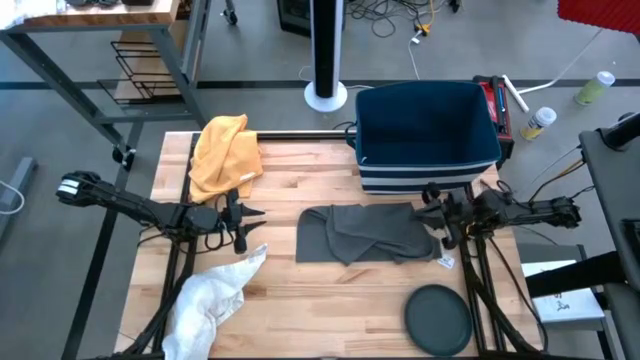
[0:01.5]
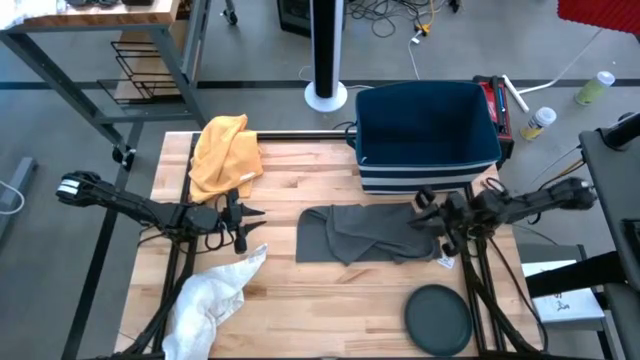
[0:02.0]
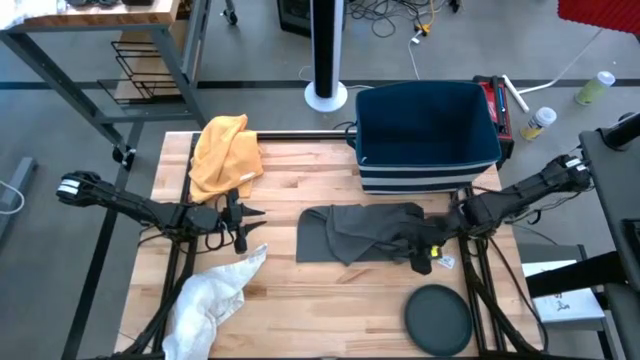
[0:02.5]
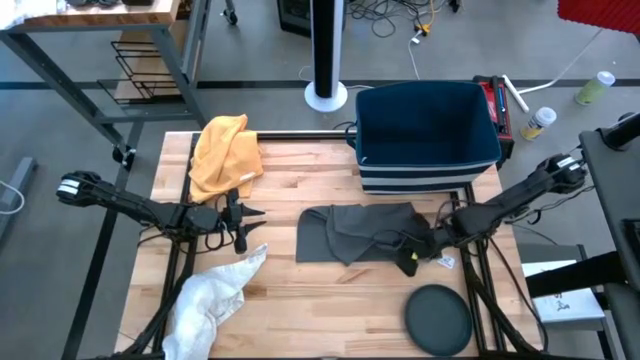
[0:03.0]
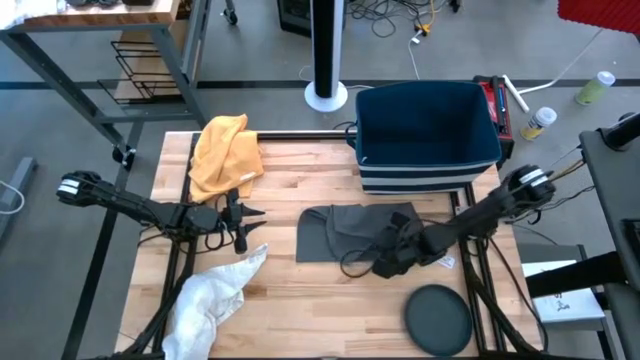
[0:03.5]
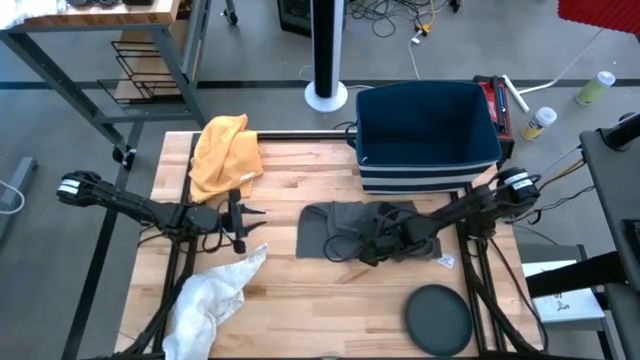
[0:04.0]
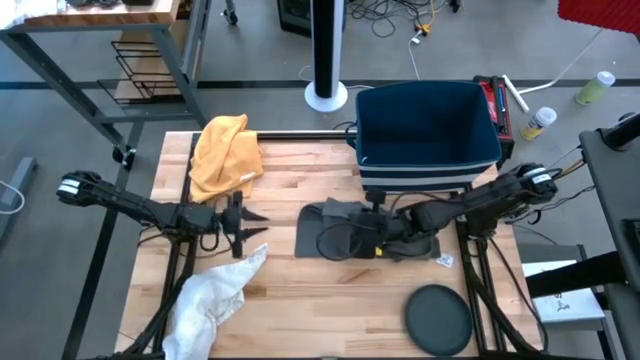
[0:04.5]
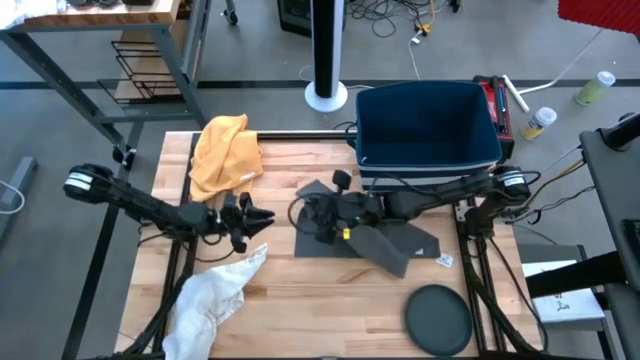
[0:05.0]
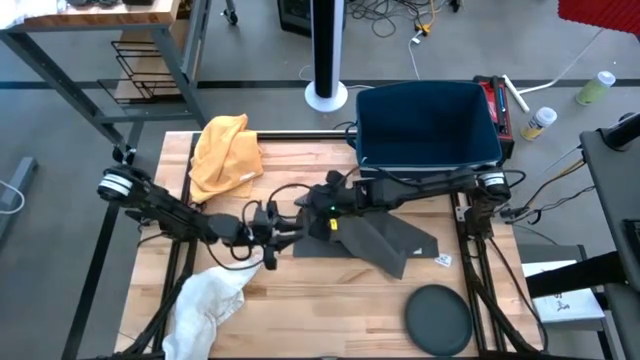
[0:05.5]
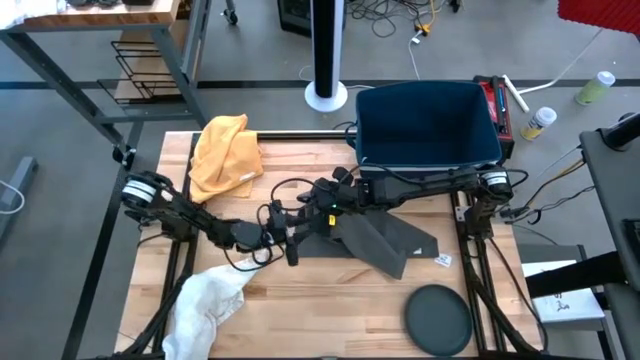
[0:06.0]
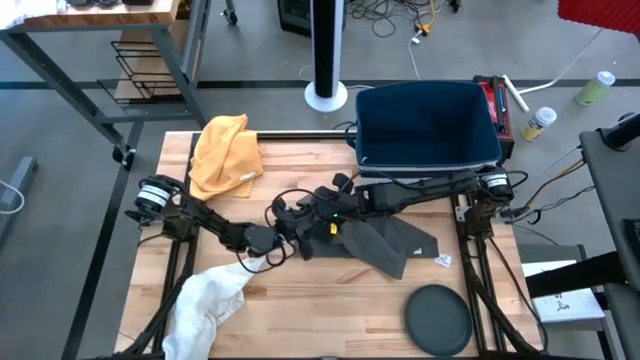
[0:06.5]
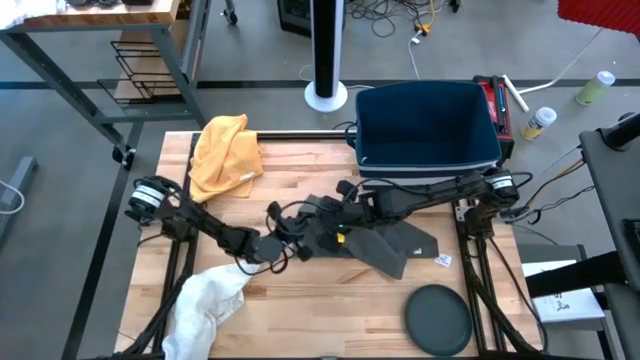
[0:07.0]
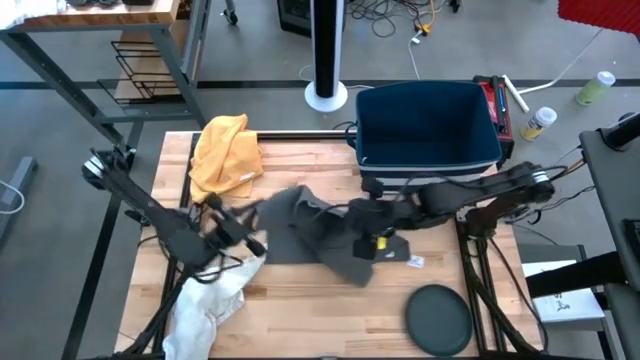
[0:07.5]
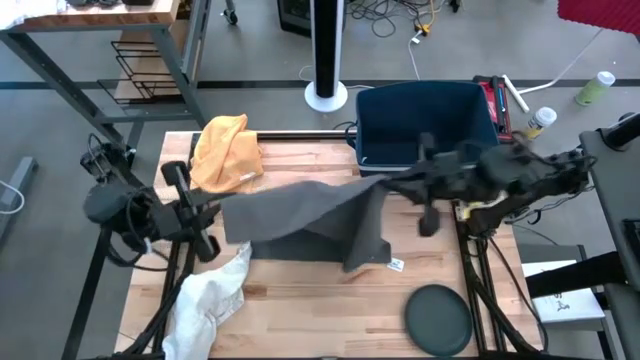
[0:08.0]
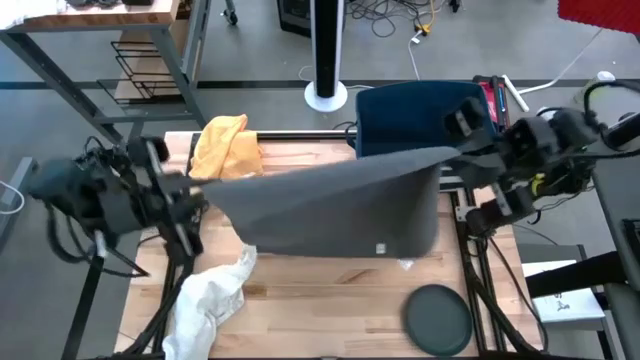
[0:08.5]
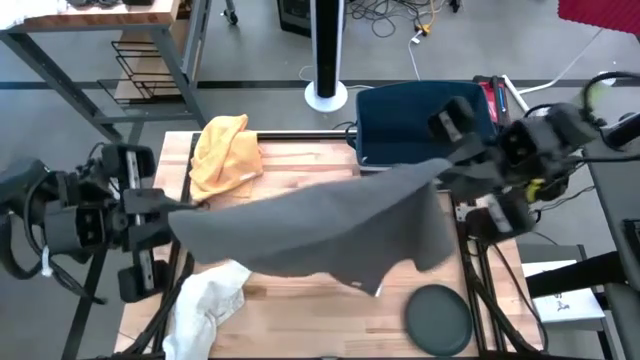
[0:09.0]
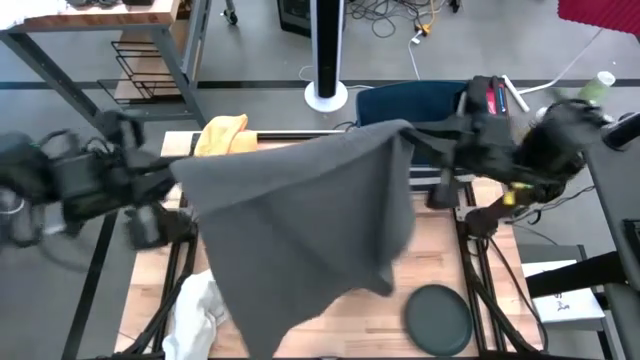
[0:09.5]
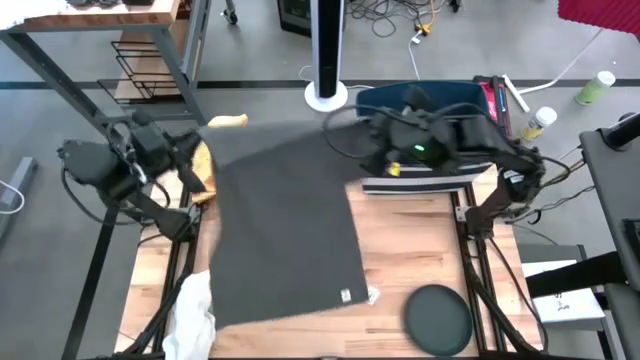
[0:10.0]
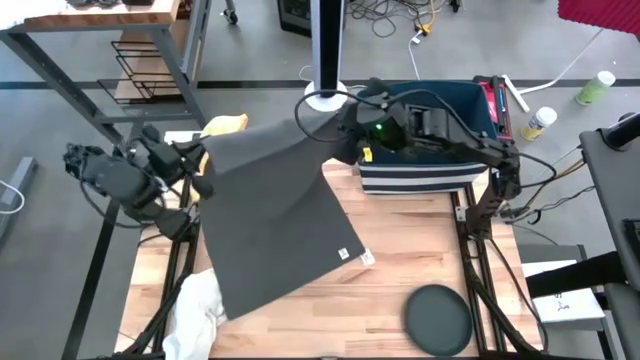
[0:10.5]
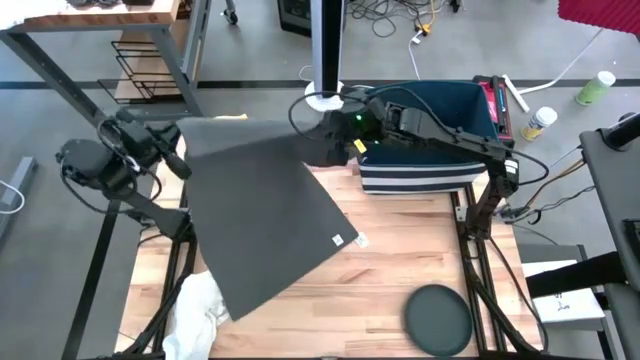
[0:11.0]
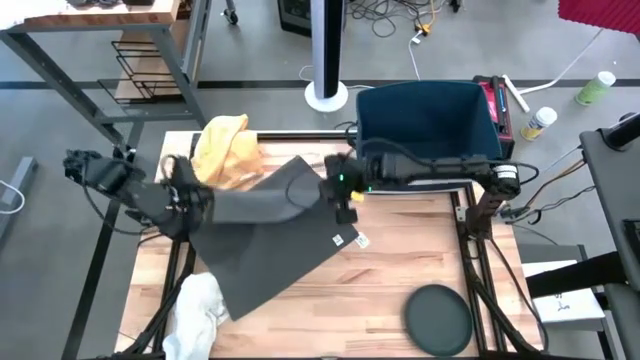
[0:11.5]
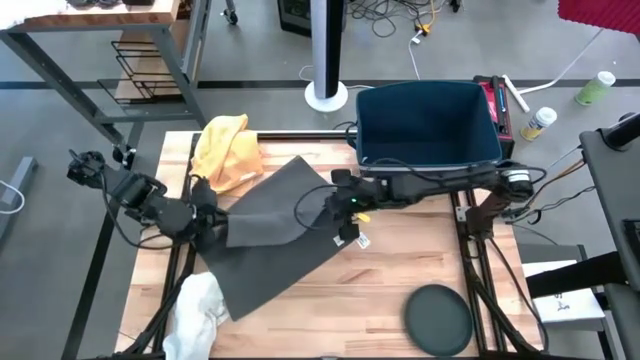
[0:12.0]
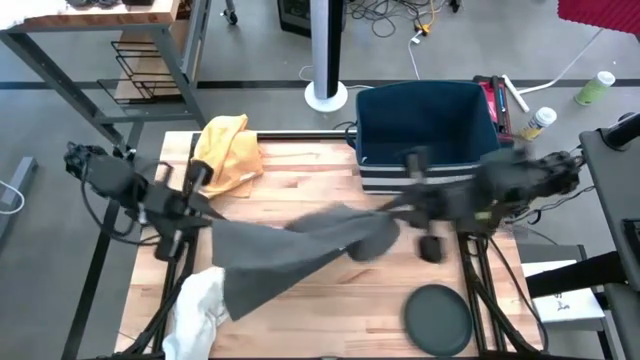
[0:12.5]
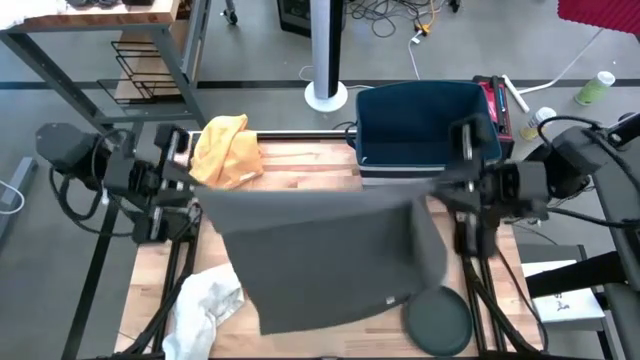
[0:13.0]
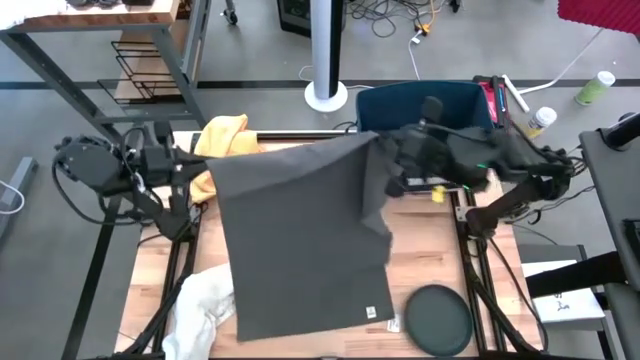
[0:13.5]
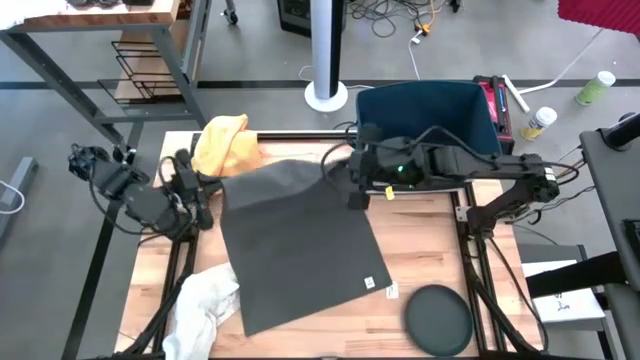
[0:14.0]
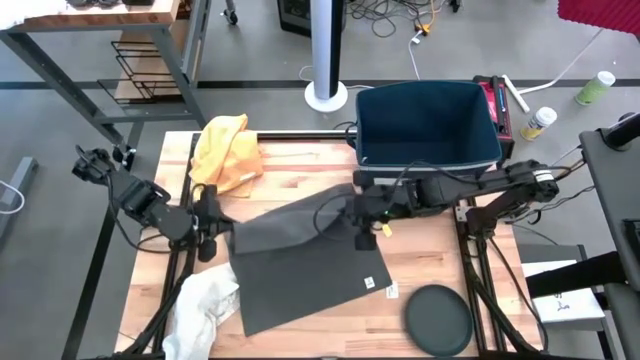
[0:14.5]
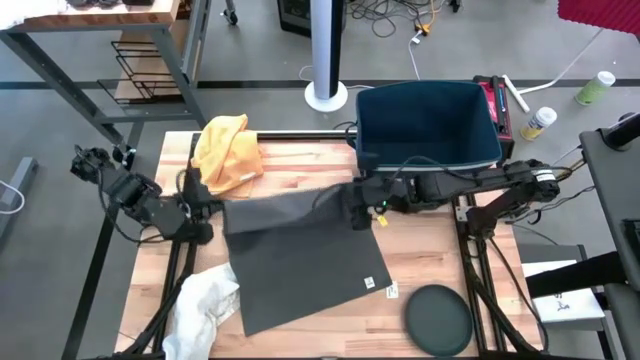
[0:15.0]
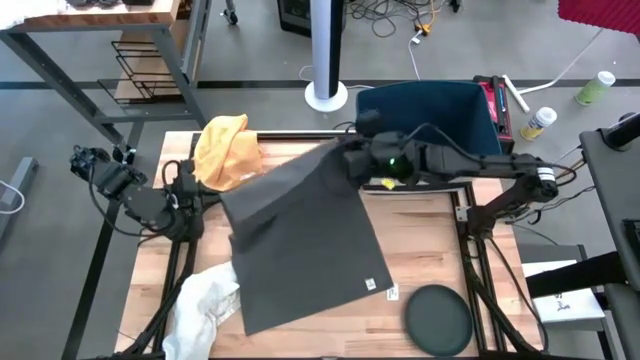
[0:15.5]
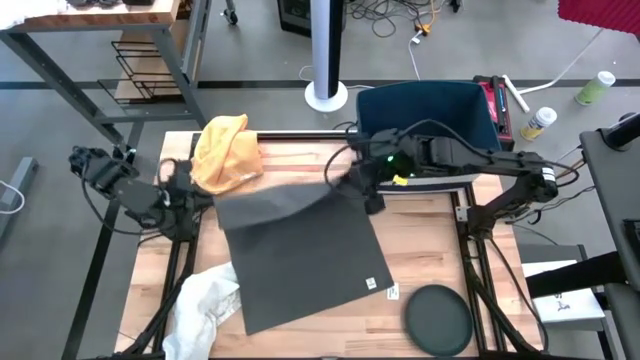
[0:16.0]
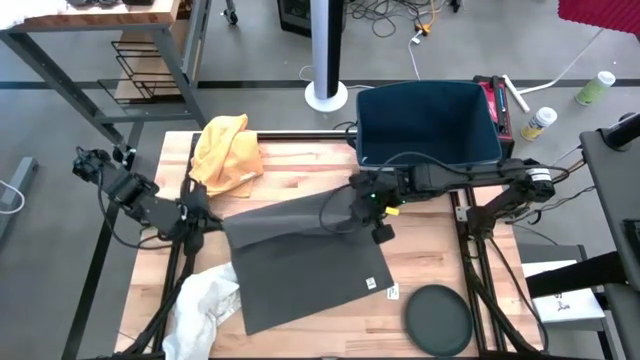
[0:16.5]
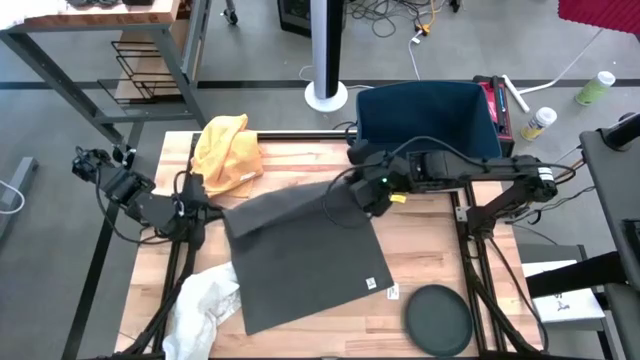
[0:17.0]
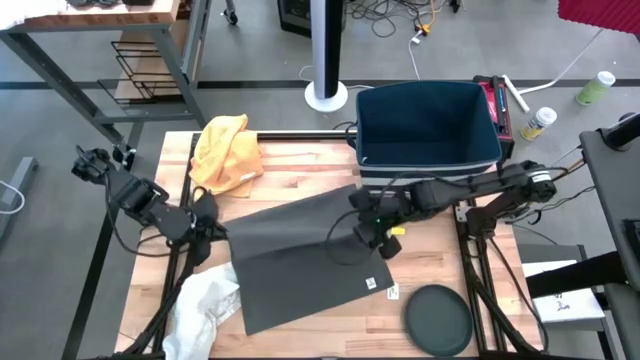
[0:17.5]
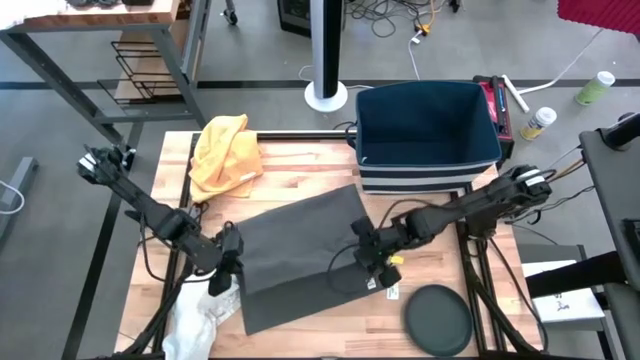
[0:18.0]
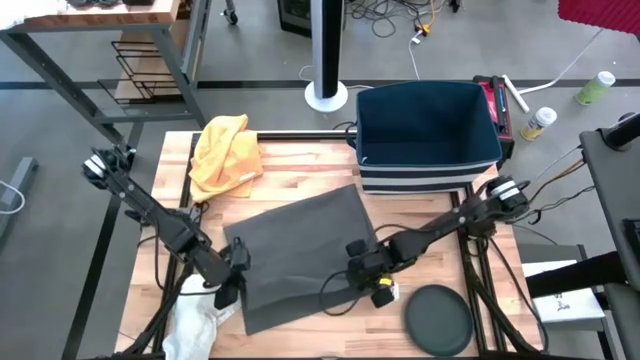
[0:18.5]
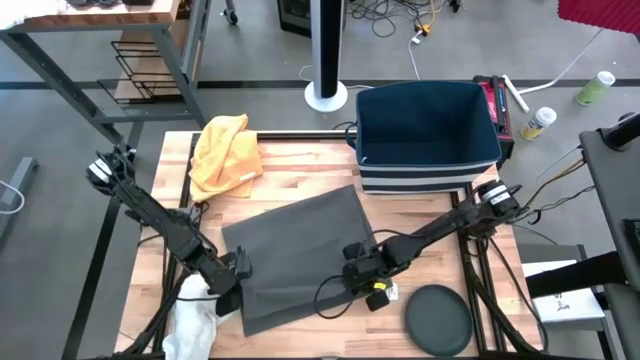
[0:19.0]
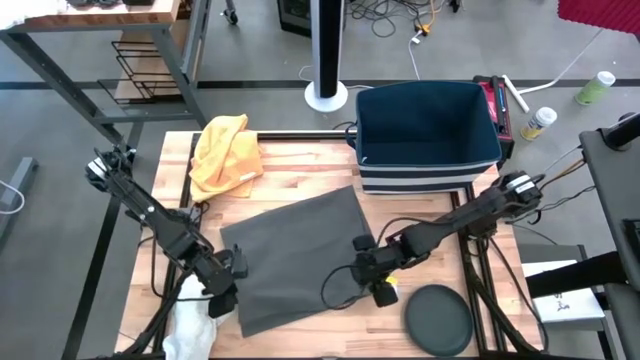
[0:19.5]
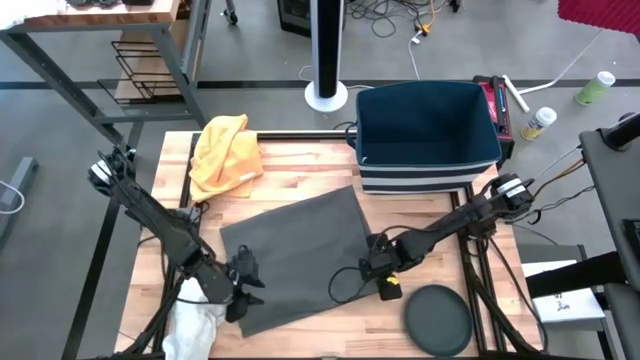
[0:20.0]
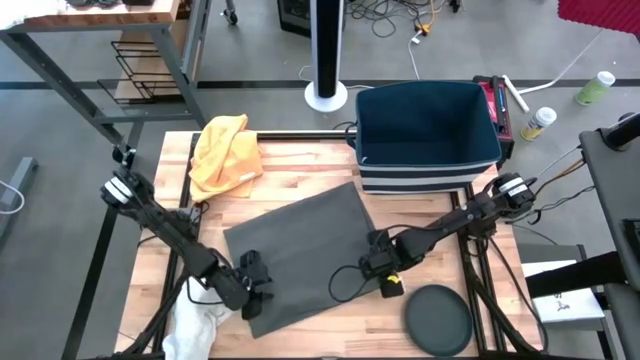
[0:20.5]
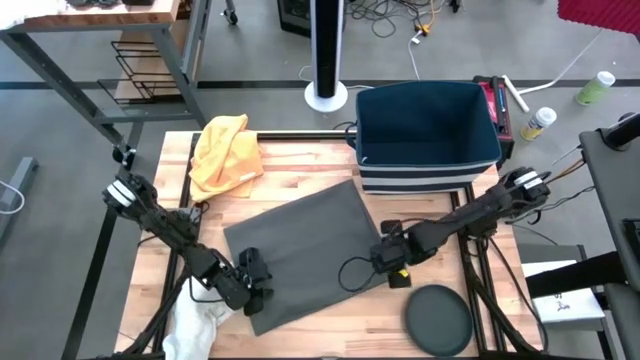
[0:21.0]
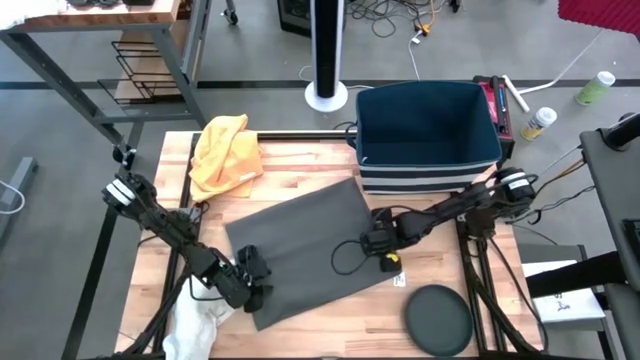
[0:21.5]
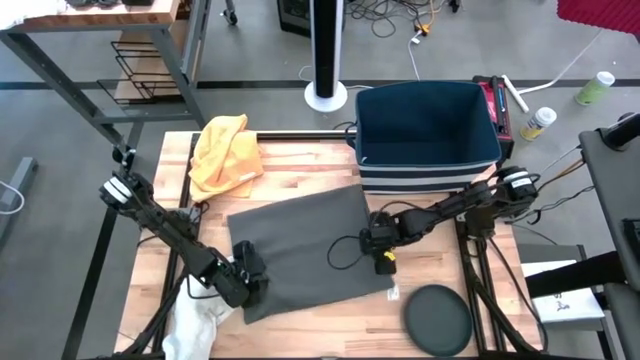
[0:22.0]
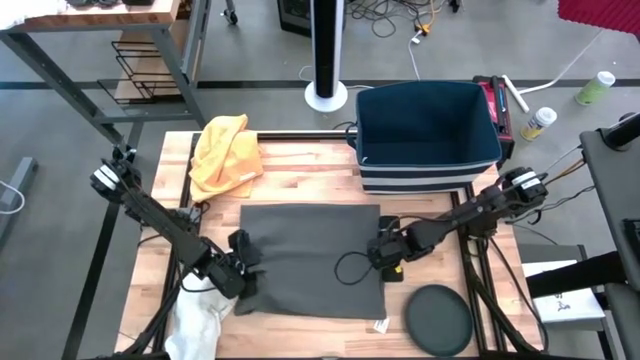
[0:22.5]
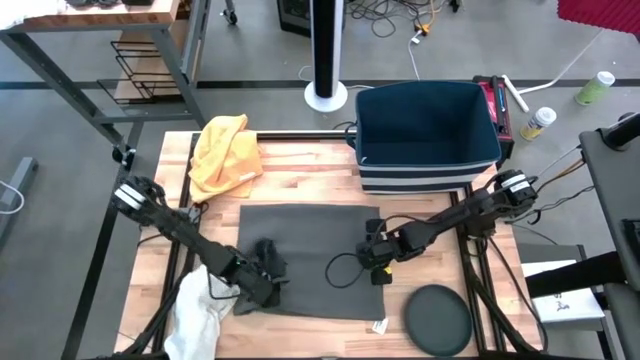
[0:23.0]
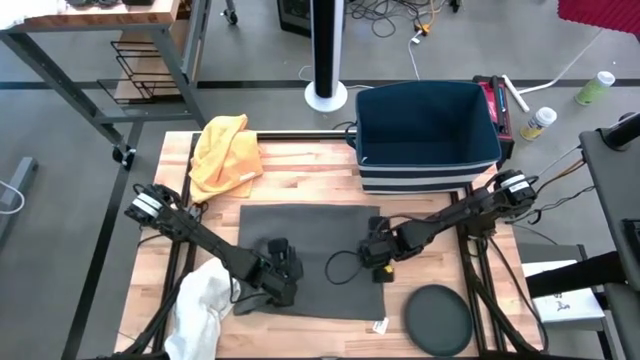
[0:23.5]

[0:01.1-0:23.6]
Task: Fold kitchen towel into neat rectangle
Fold the gray towel
